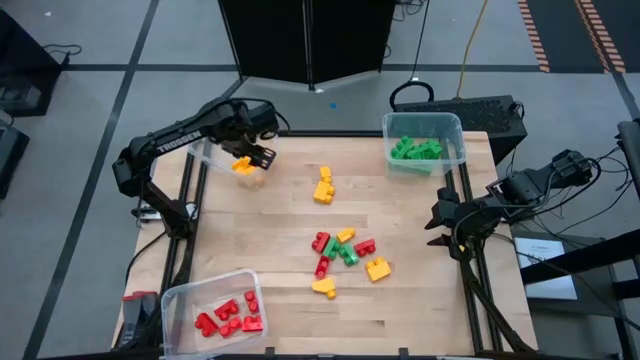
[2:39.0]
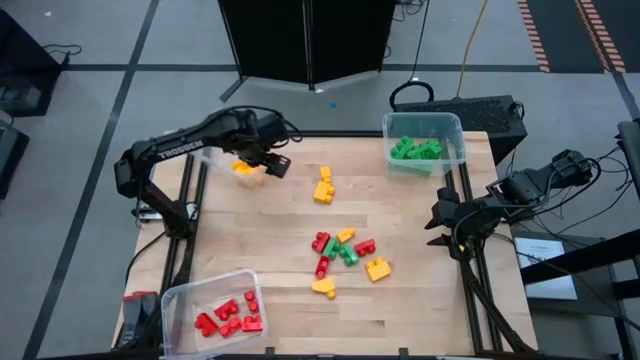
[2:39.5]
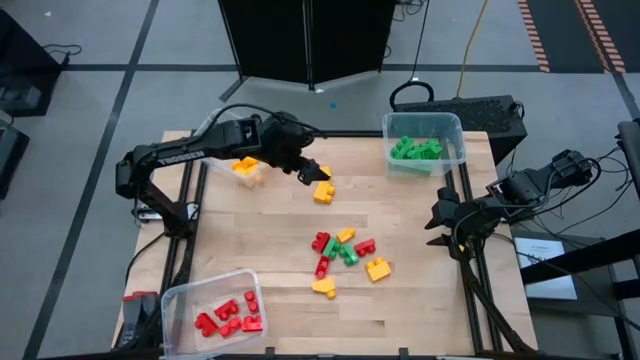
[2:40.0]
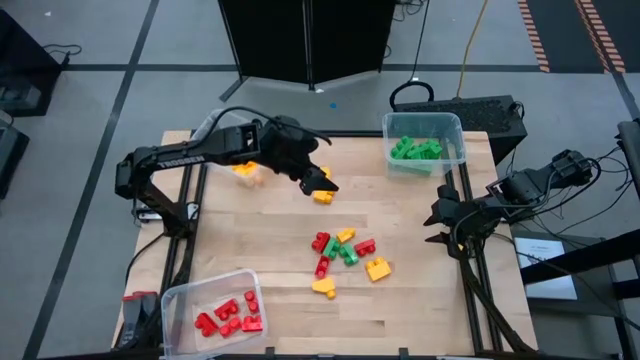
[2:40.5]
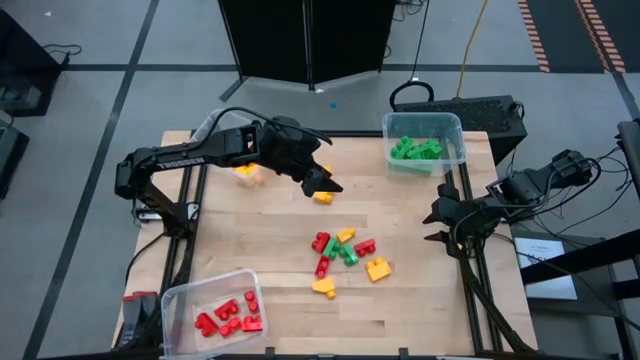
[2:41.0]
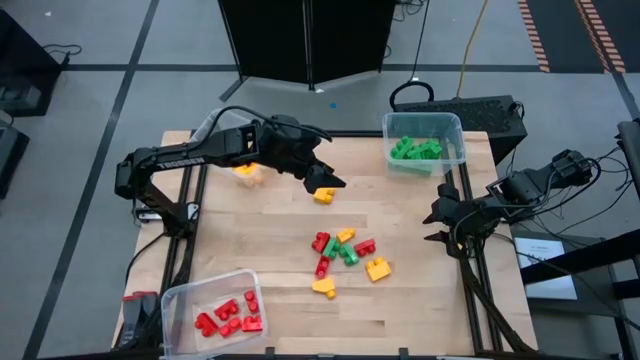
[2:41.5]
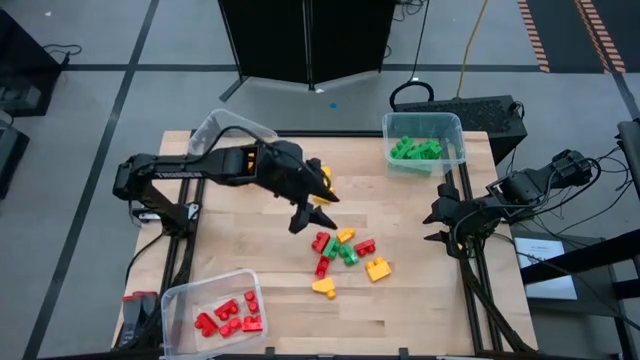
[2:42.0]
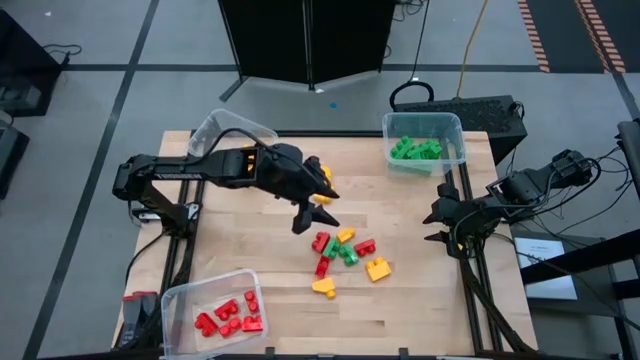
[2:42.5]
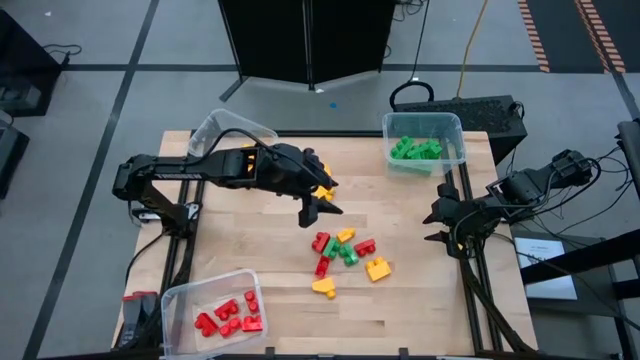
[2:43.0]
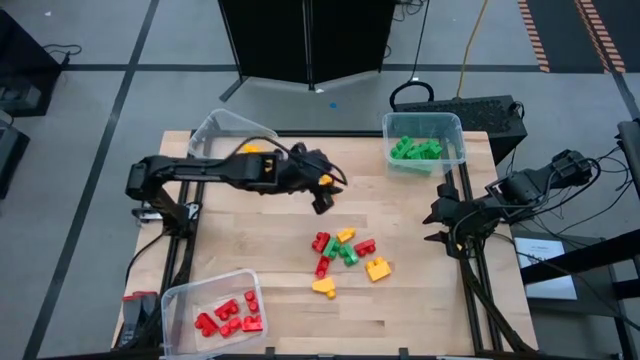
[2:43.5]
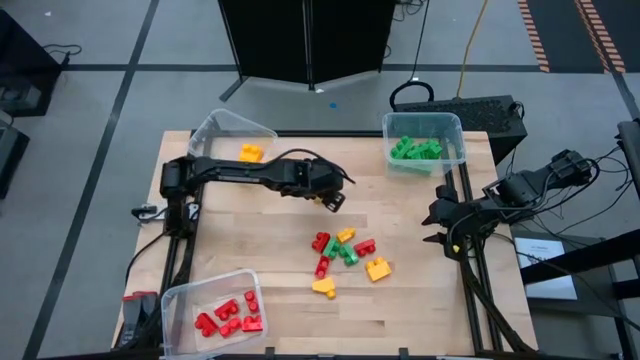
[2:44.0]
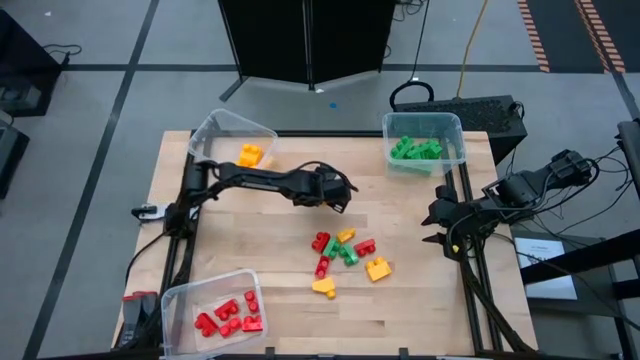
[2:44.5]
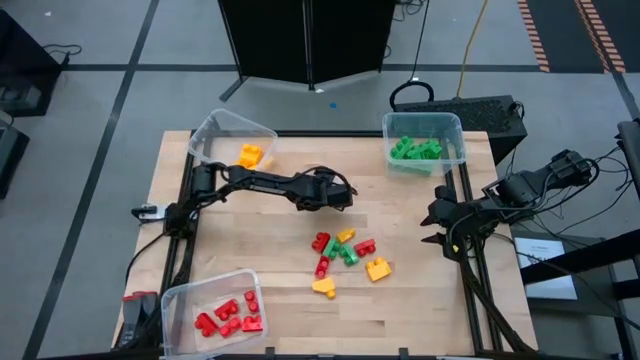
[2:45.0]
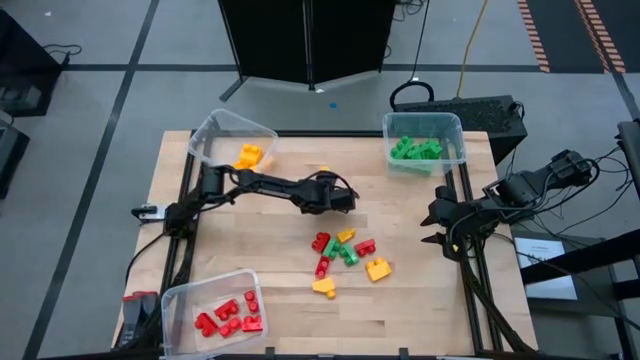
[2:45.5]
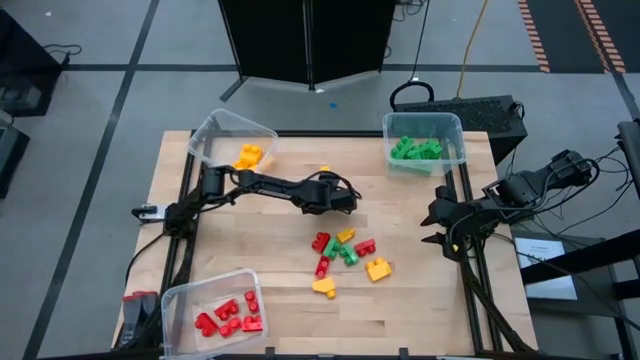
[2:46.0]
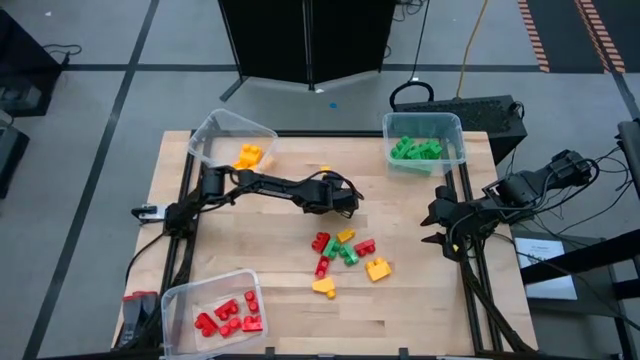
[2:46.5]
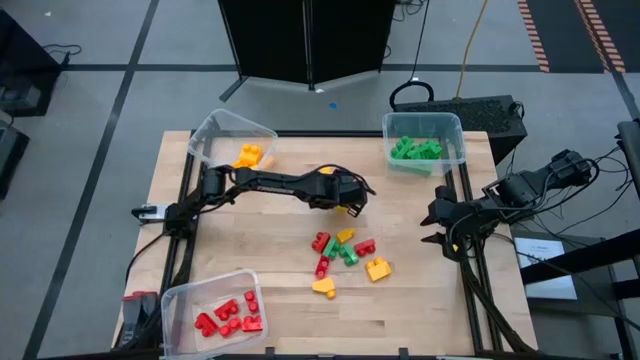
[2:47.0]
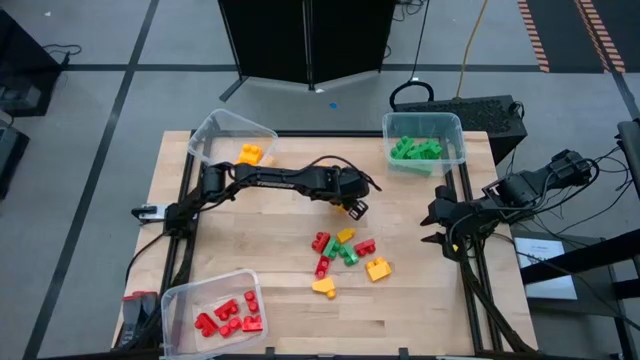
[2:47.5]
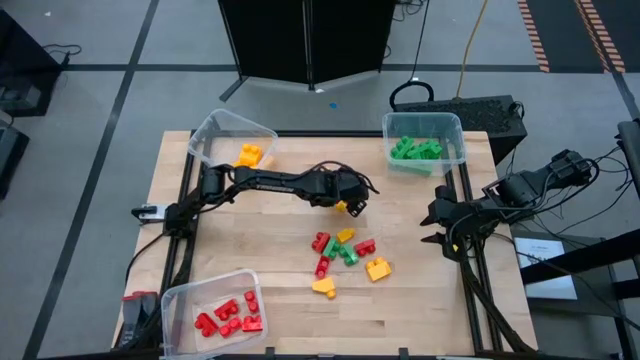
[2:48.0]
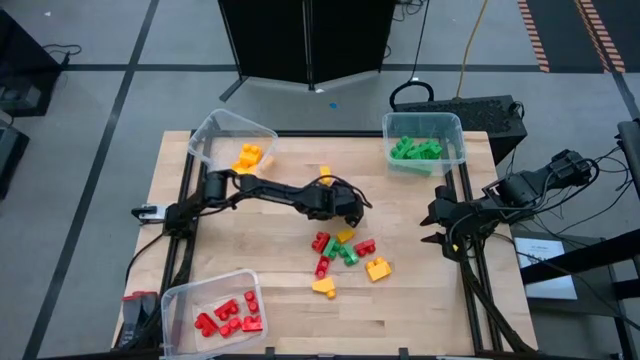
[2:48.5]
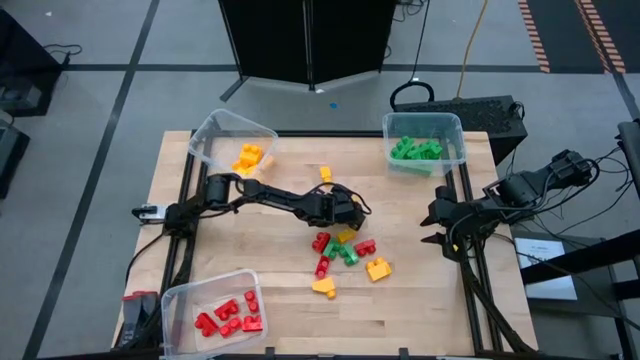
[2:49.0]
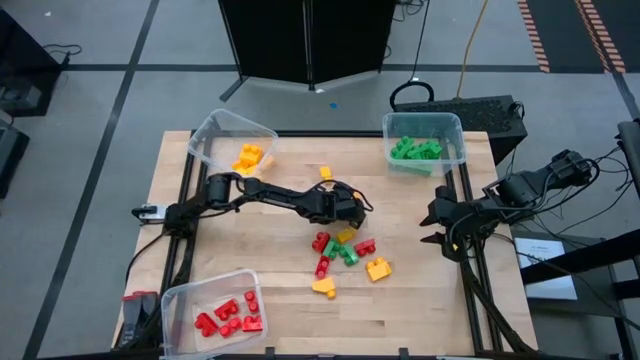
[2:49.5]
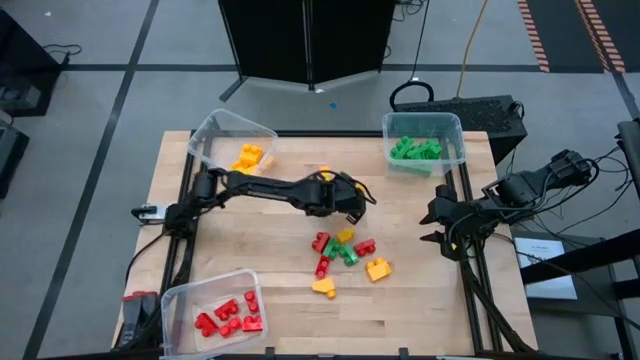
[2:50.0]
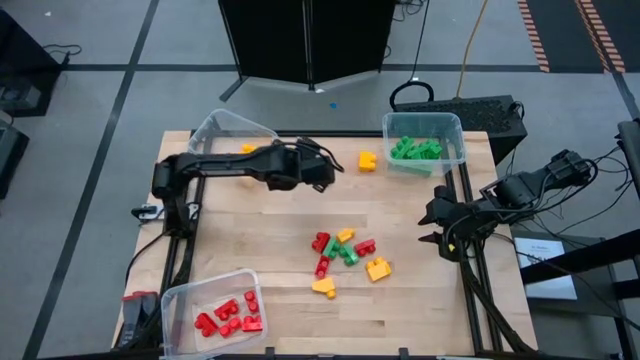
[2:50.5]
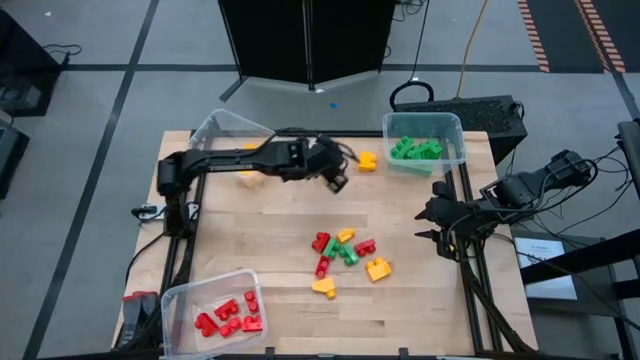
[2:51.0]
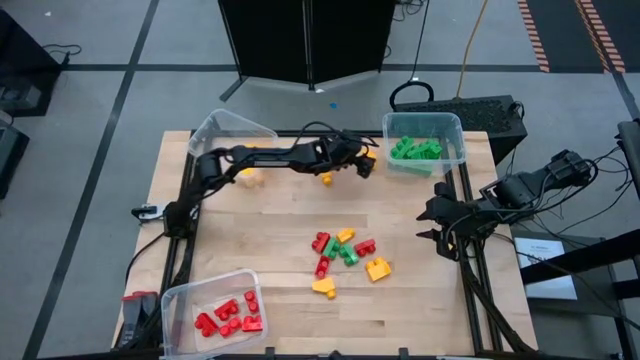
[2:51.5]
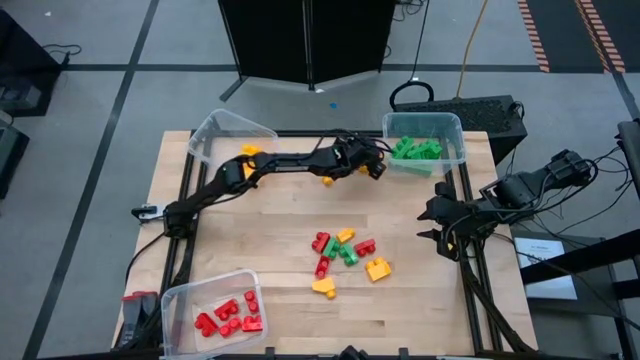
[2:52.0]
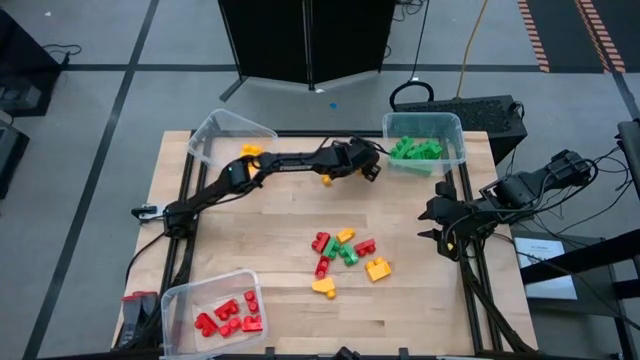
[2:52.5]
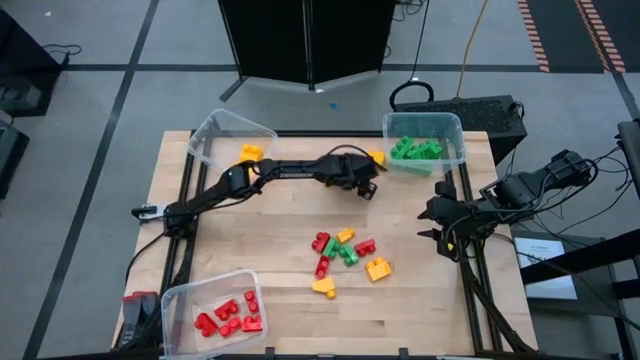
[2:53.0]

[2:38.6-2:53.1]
Task: Sort blocks
Put the yellow game piece into the top left transparent bin

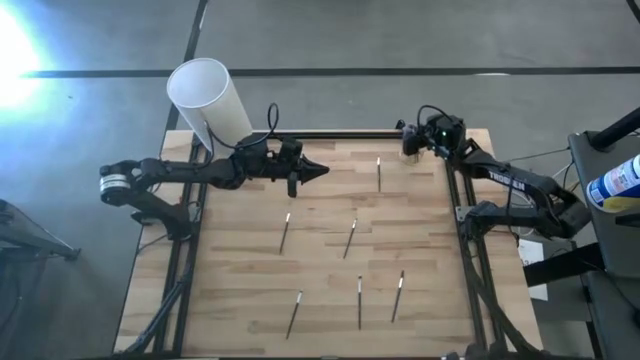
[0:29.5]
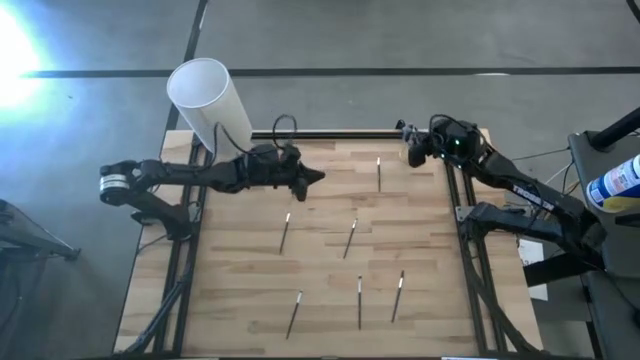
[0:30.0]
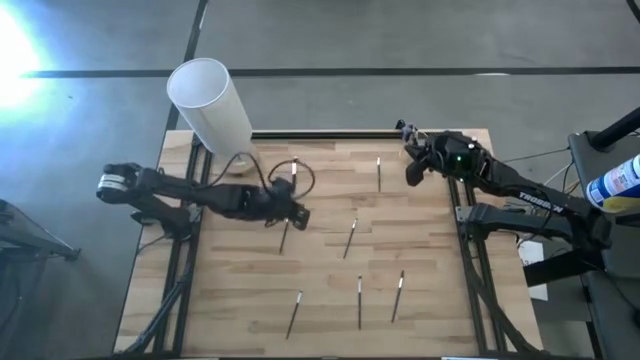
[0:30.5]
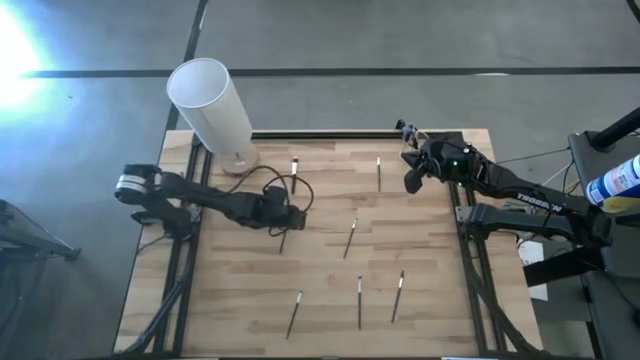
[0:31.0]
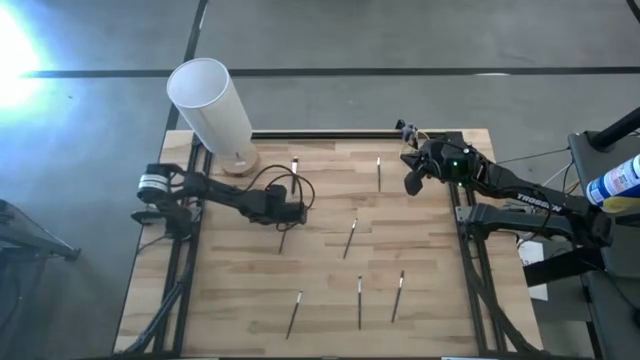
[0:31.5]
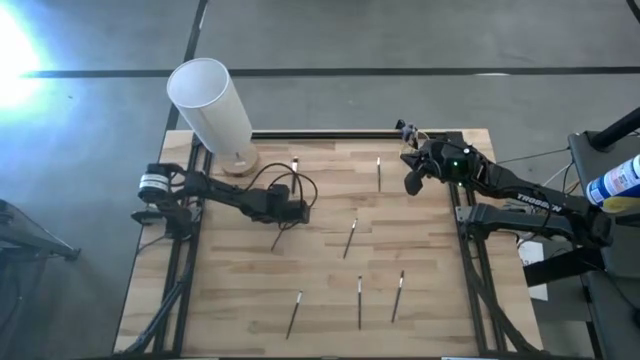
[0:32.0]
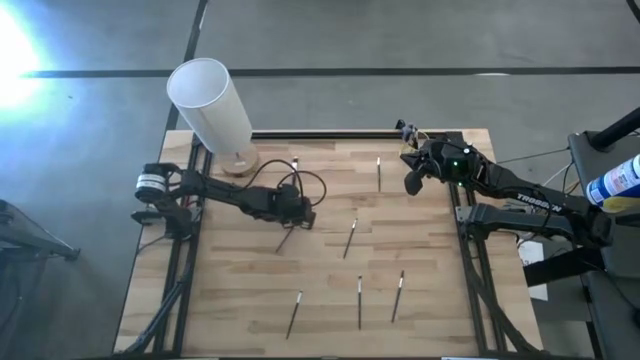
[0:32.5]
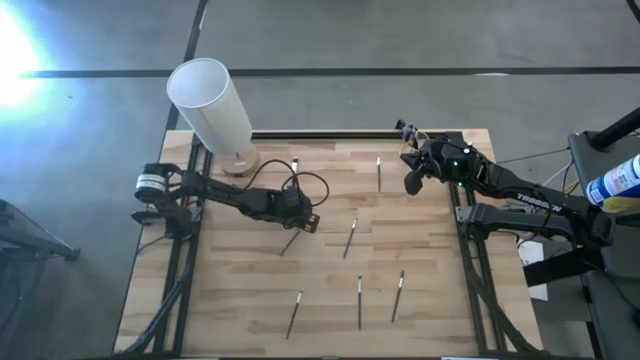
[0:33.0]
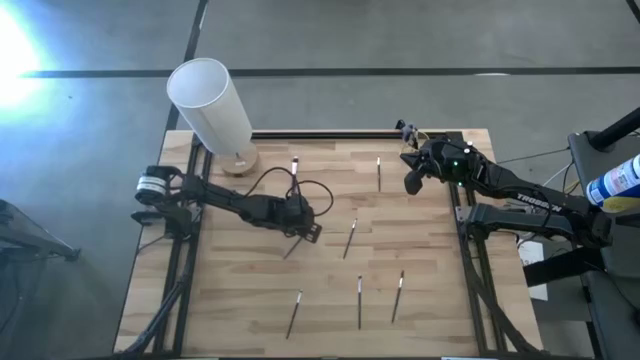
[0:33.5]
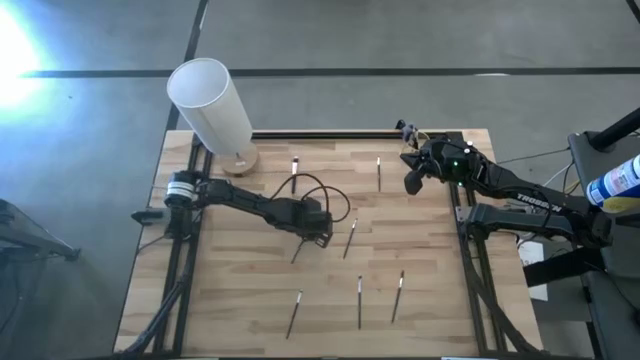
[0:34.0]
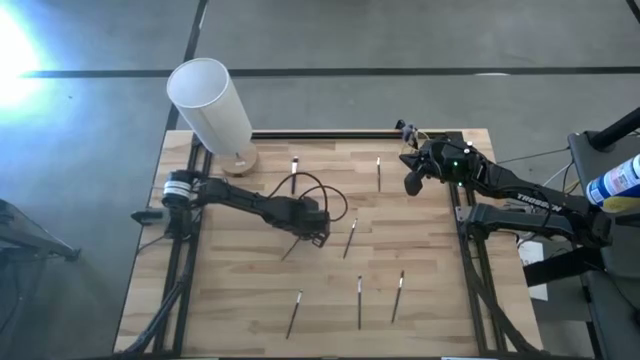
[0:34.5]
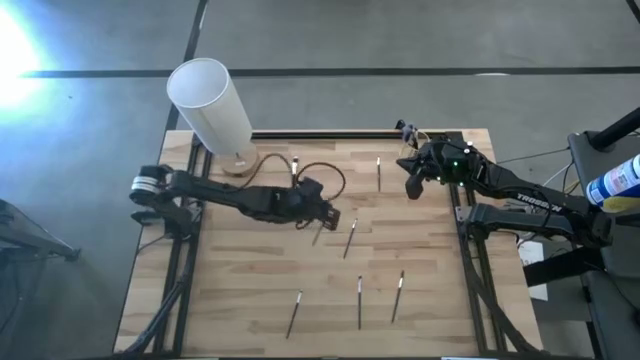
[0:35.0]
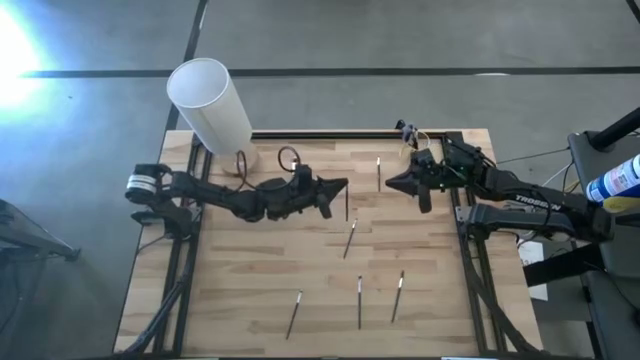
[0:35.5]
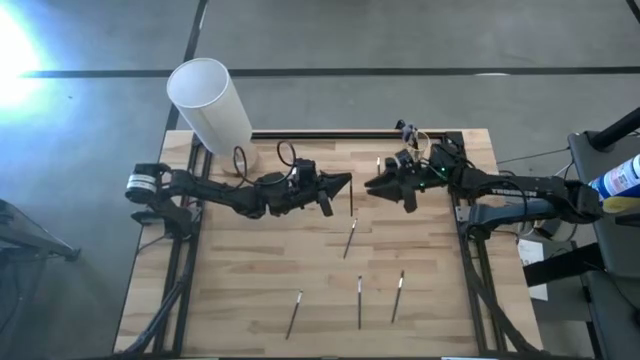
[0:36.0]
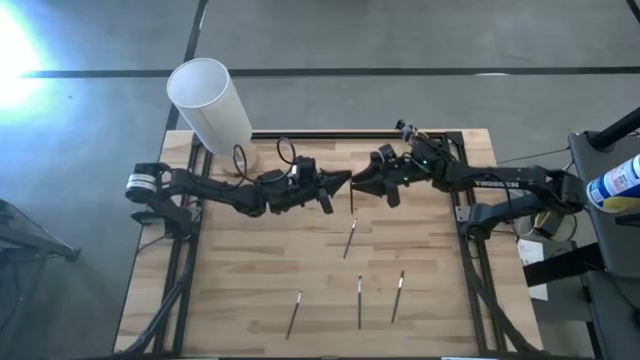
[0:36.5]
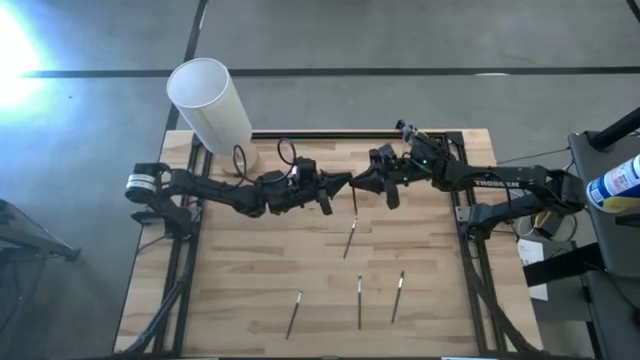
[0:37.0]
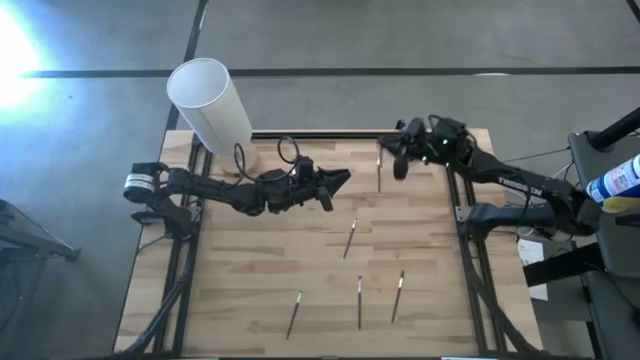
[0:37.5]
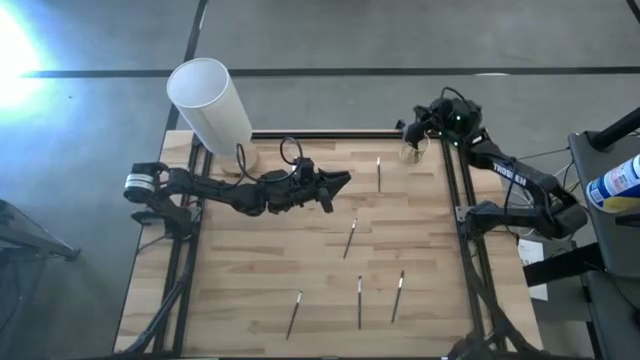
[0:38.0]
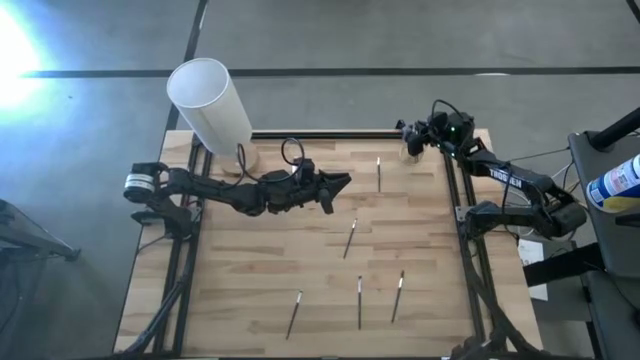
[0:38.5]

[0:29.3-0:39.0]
Task: Put items in baskets/containers
Put the liner brush into the yellow container
